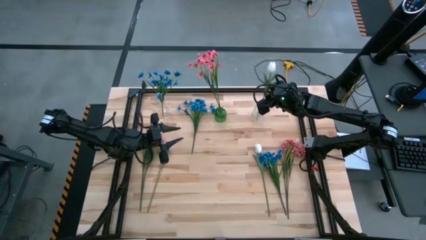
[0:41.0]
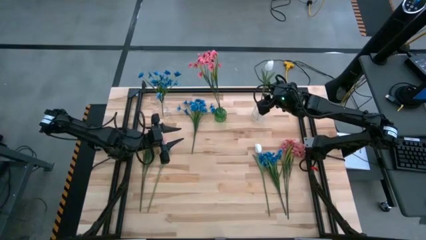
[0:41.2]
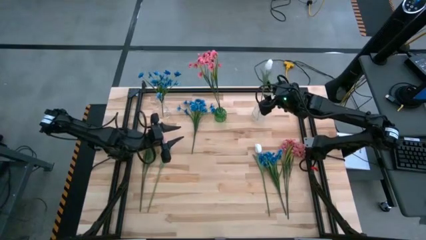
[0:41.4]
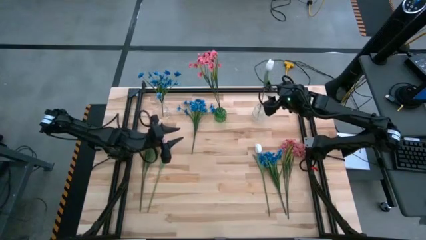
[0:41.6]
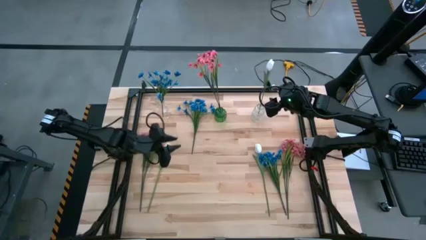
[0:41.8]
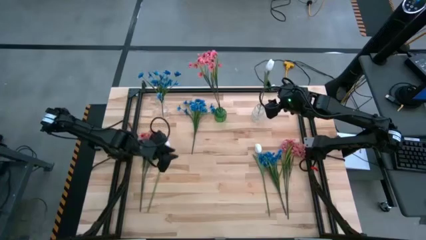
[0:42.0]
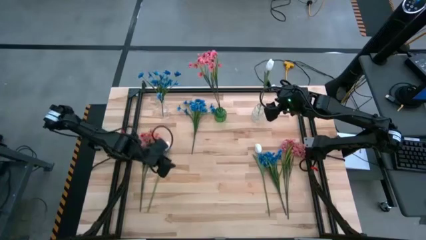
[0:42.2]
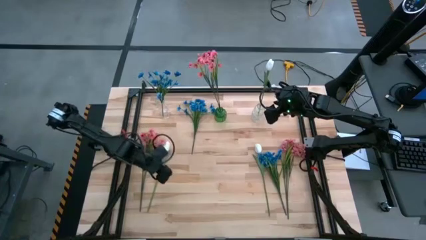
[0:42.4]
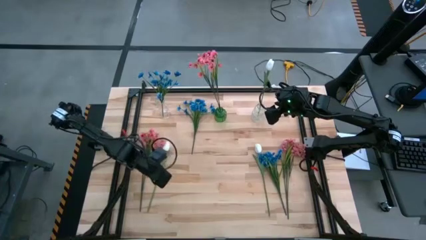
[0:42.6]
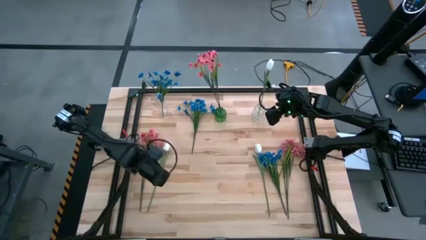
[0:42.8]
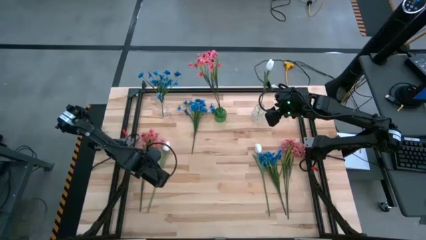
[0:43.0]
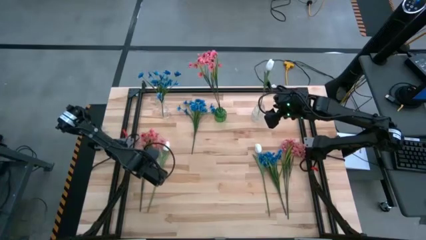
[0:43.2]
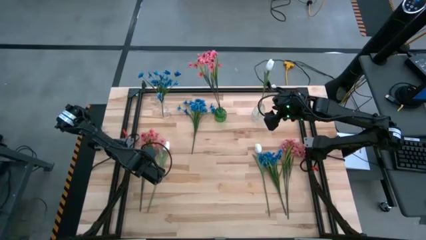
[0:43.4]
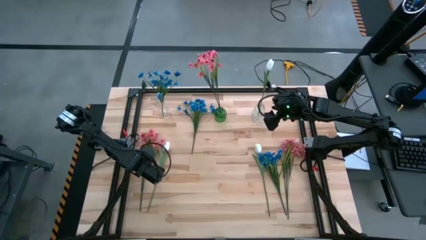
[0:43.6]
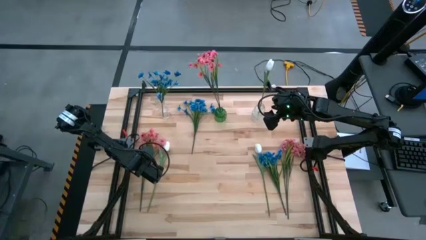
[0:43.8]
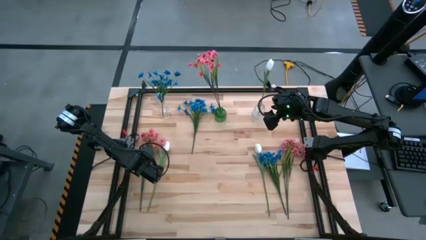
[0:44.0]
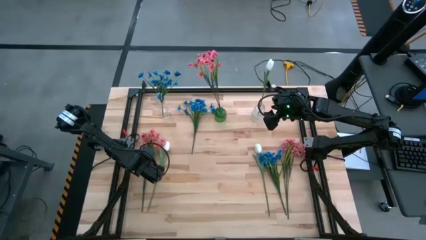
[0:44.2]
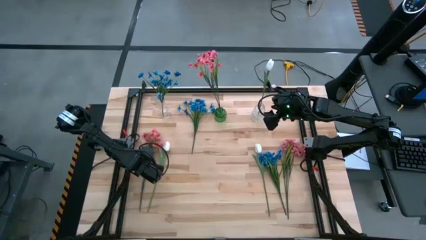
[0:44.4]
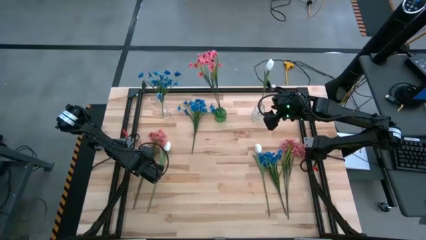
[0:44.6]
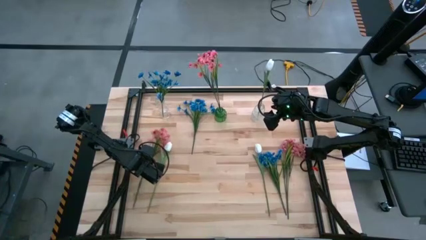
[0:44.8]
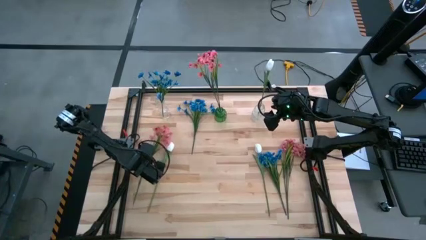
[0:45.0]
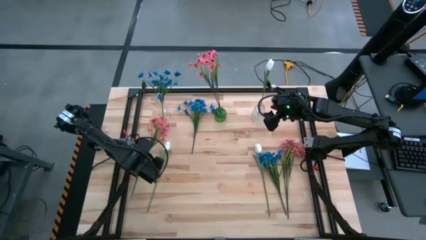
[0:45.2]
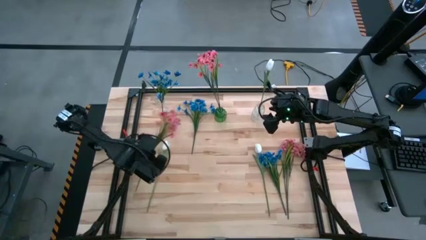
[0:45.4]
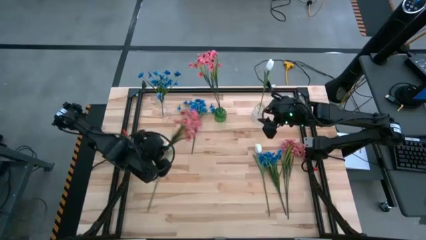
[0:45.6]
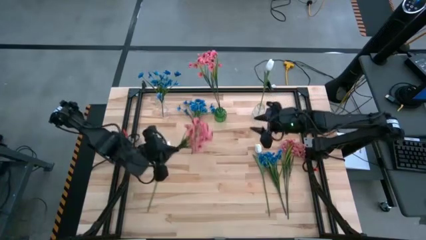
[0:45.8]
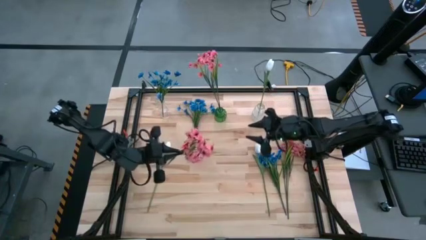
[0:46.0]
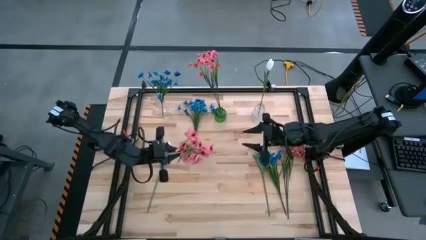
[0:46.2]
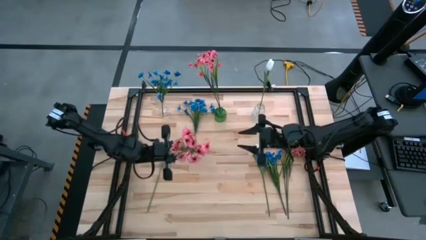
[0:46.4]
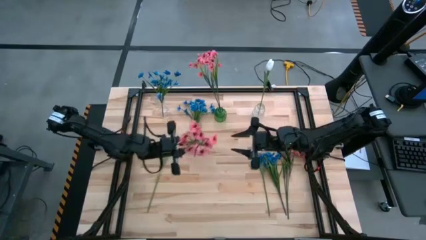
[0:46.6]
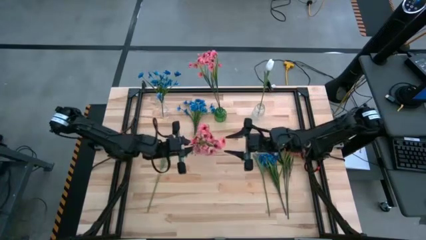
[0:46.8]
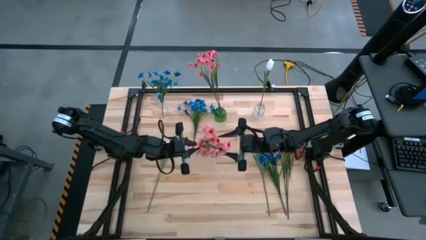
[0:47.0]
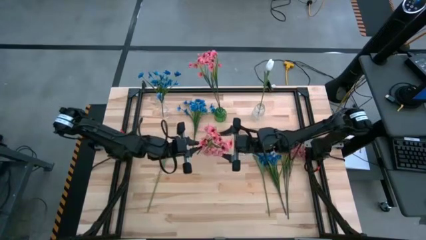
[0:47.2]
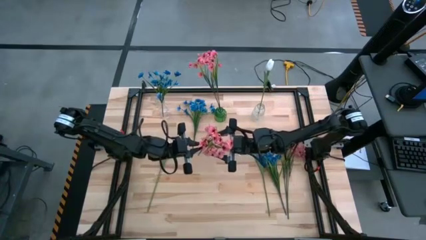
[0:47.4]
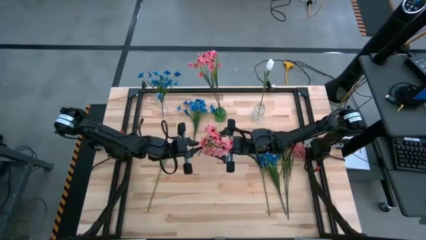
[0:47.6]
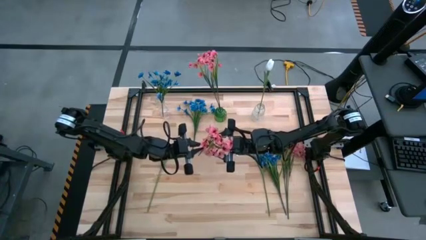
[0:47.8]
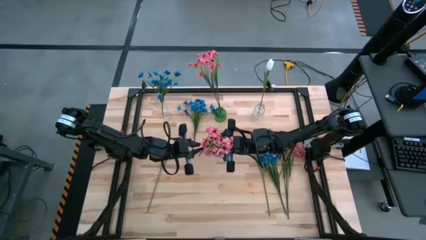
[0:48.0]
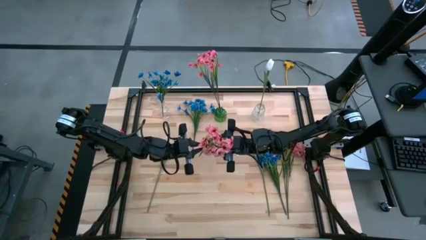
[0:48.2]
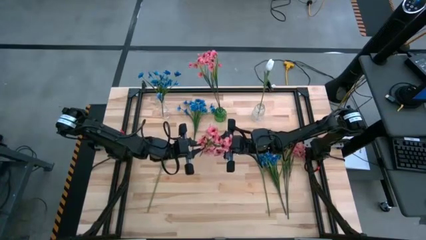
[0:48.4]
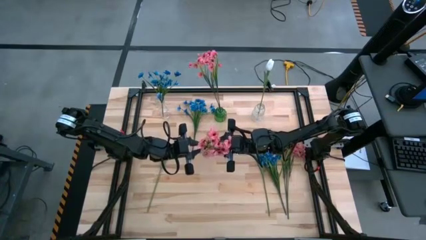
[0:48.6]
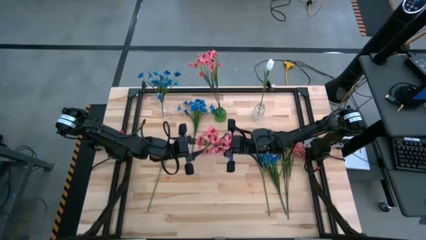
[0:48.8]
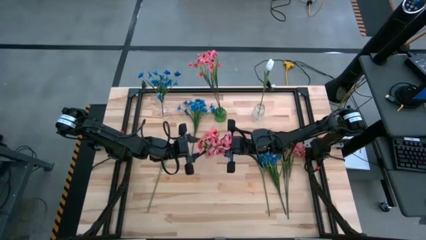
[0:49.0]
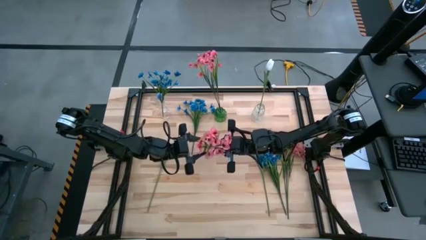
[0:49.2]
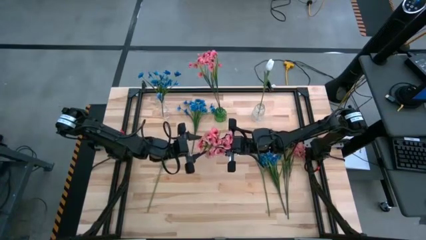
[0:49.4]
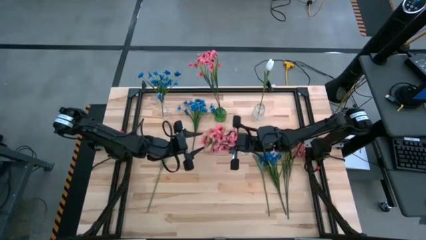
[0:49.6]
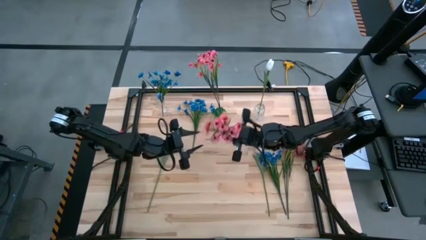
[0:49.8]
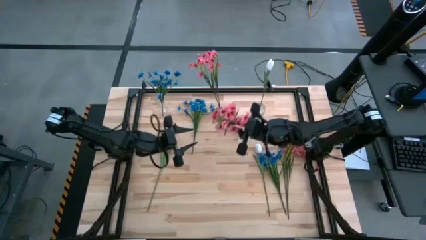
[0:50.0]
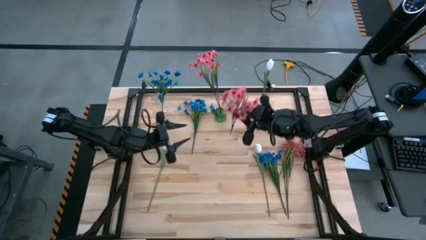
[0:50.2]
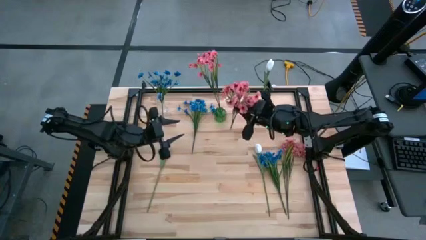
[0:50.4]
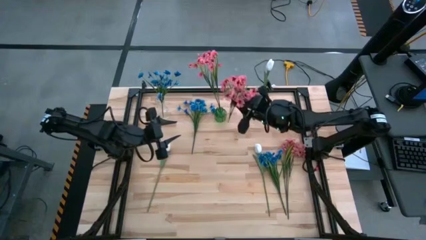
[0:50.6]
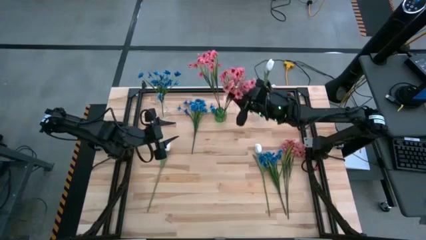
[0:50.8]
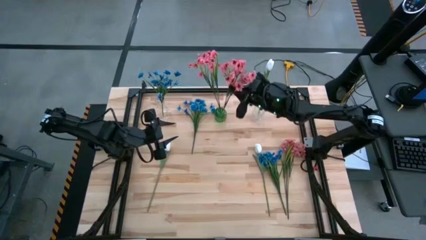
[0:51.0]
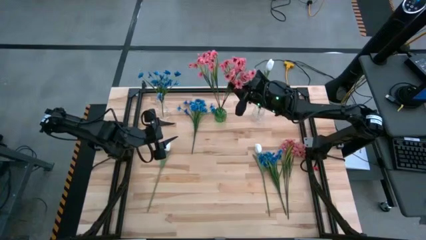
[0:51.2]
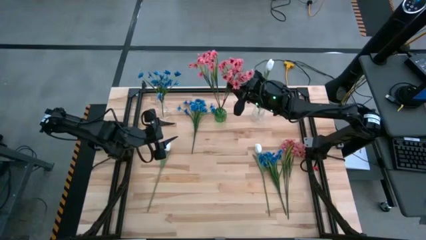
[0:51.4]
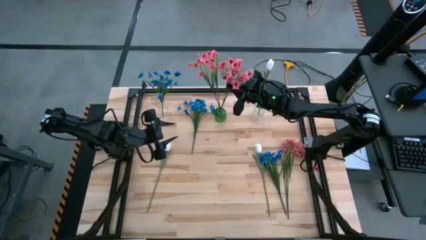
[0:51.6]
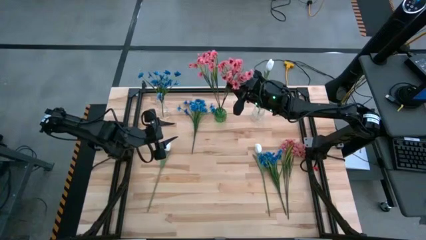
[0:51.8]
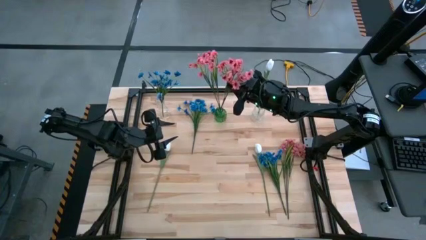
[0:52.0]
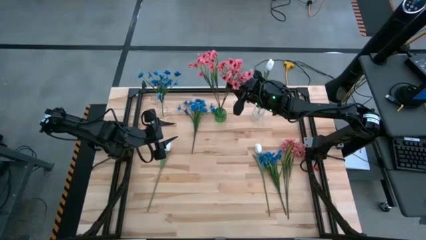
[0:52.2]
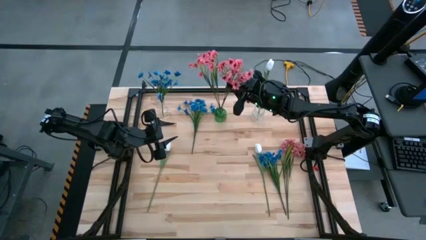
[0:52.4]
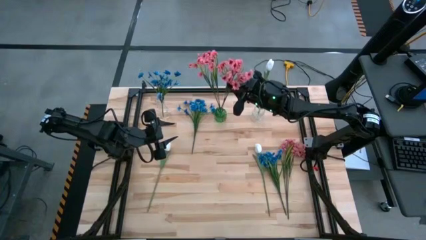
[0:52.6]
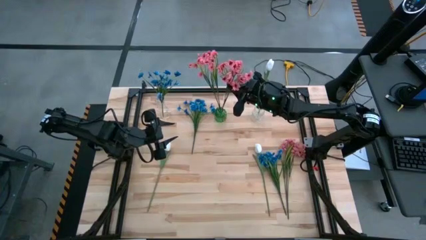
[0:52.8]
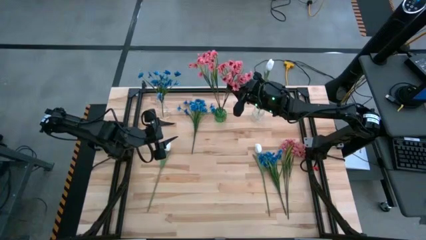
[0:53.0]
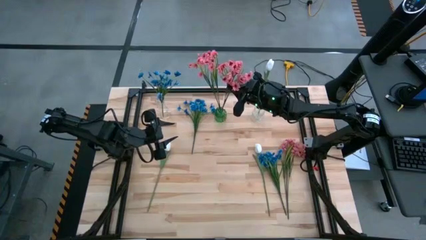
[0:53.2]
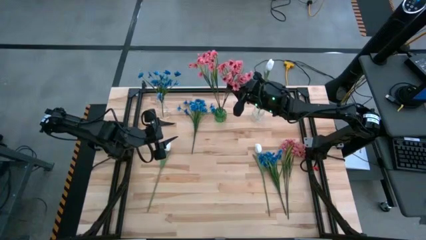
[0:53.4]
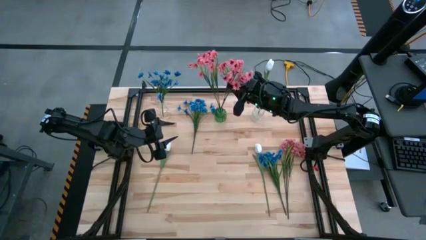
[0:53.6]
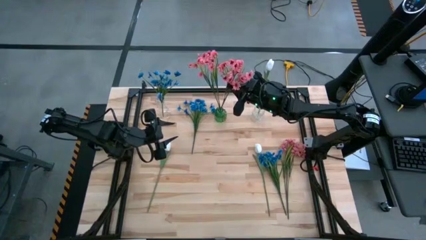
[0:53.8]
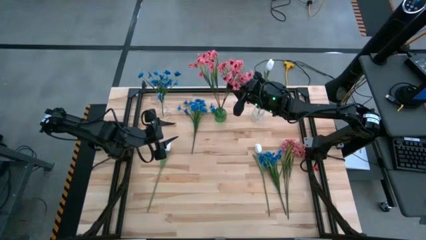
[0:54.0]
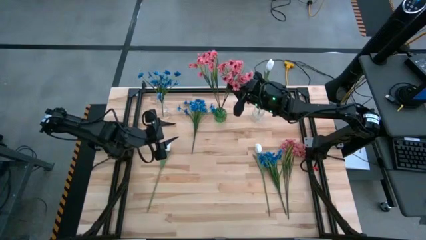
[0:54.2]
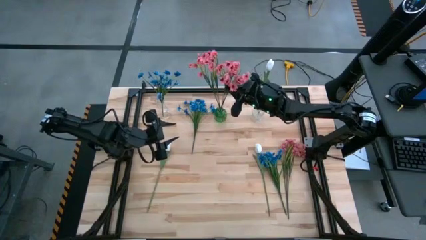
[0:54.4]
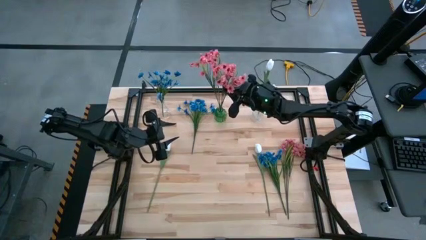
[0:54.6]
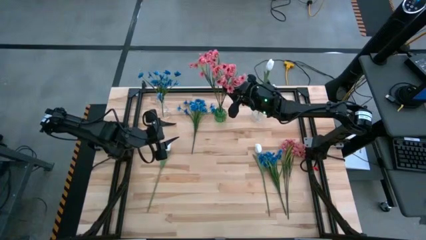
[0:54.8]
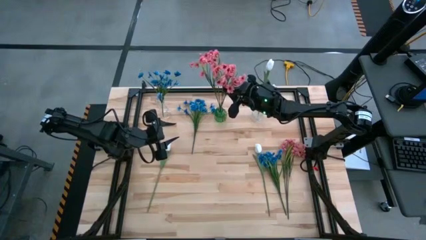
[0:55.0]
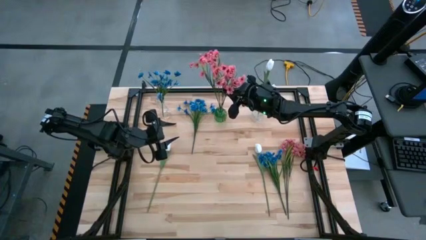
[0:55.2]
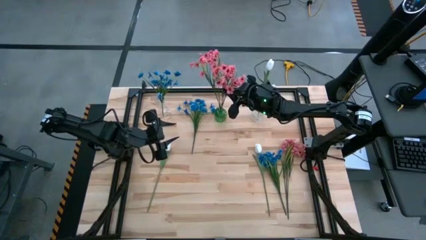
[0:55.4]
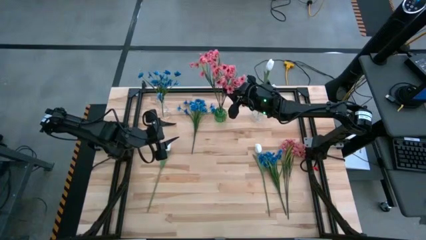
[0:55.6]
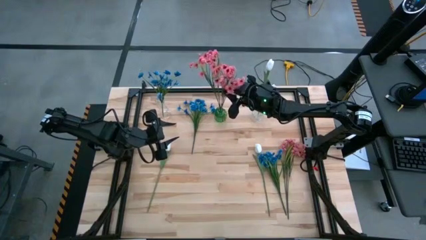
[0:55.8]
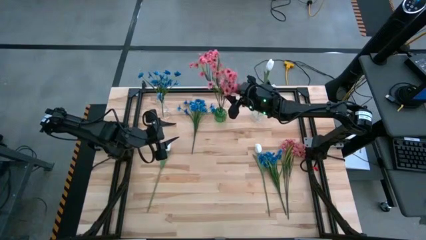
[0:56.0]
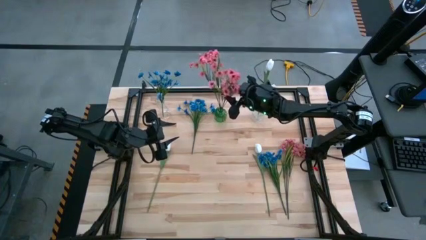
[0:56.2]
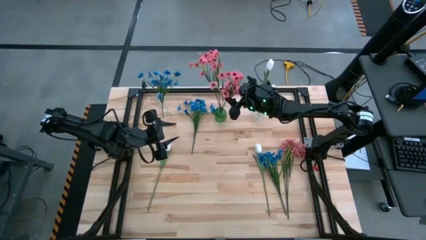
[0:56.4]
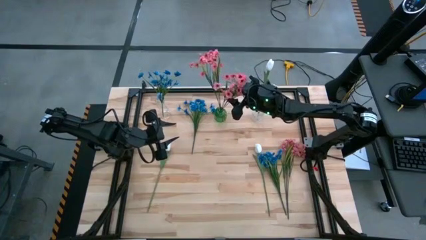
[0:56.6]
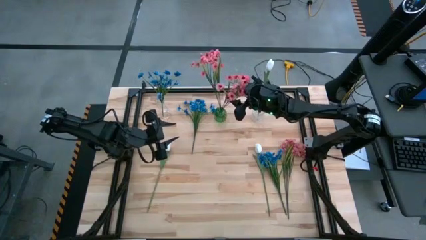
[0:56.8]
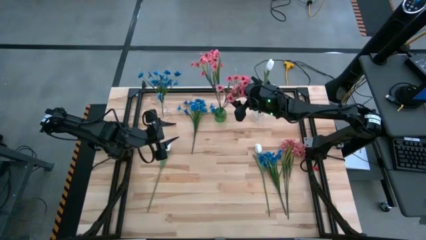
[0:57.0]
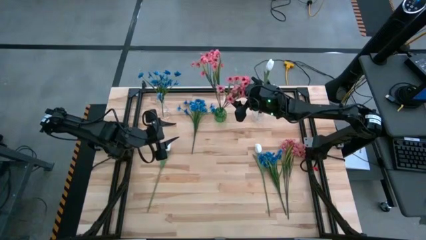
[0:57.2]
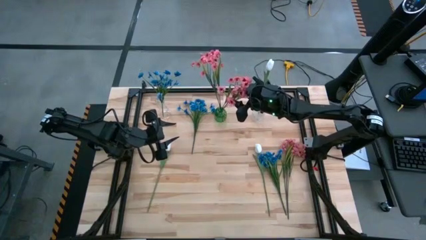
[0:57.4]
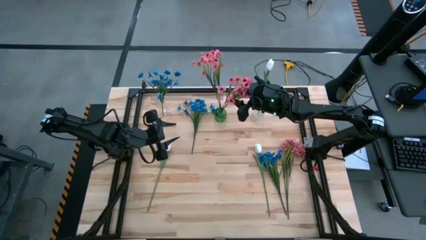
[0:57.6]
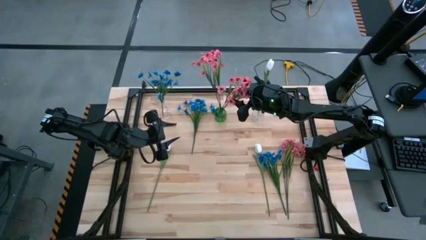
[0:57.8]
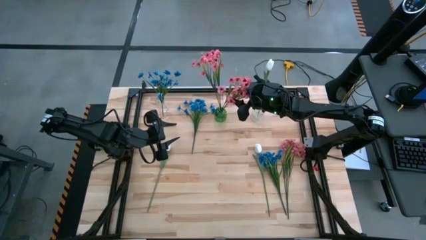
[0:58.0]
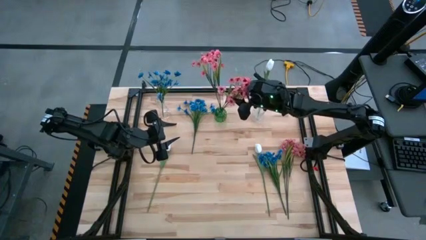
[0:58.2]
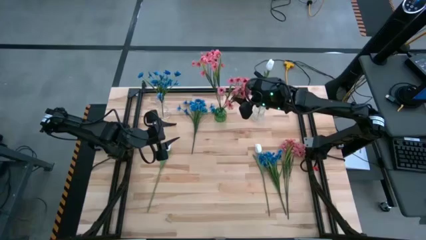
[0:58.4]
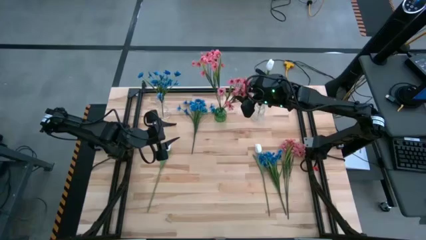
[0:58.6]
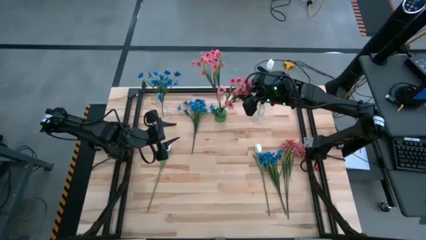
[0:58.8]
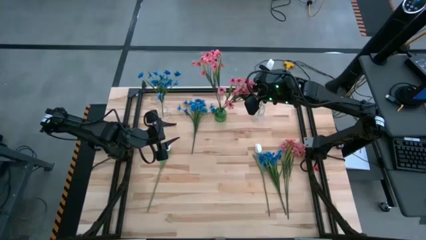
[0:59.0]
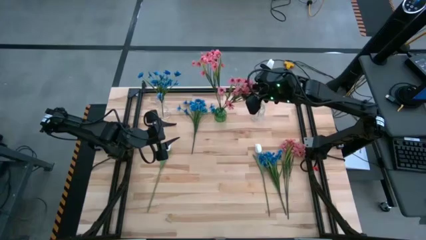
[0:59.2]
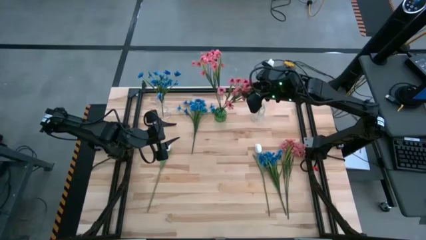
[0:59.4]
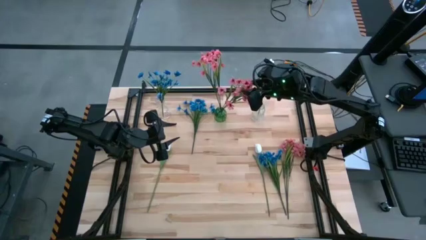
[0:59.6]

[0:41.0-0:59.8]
Task: Sort flowers into vase by color
Put the left pink flowers into the green vase
